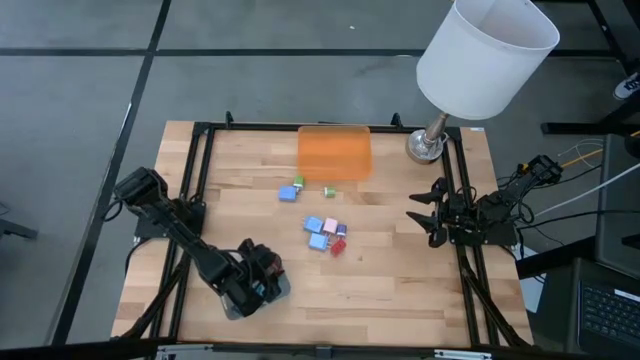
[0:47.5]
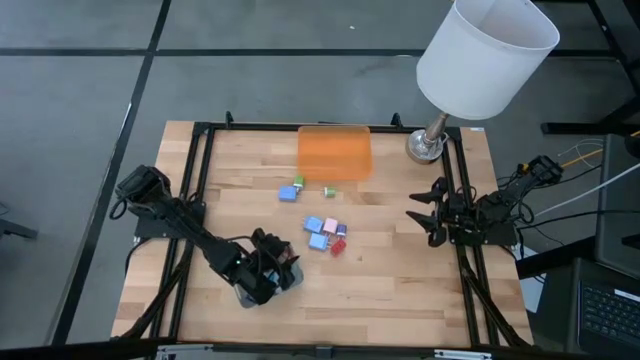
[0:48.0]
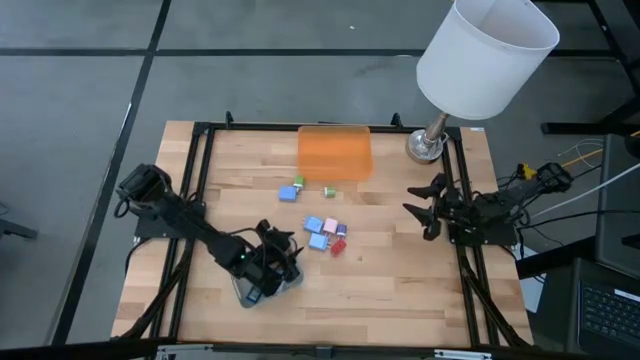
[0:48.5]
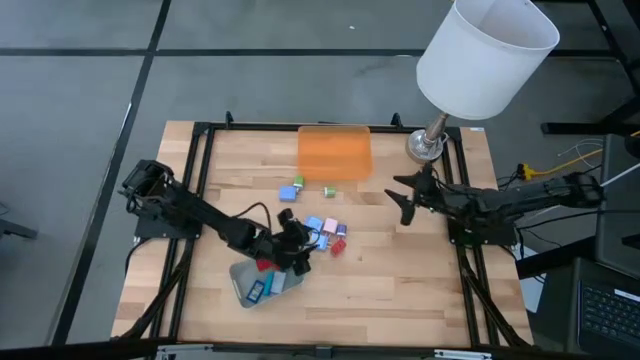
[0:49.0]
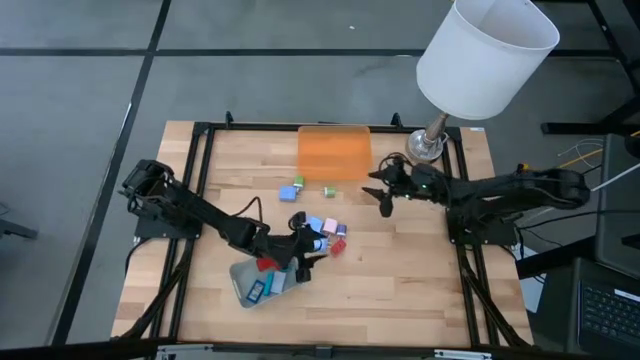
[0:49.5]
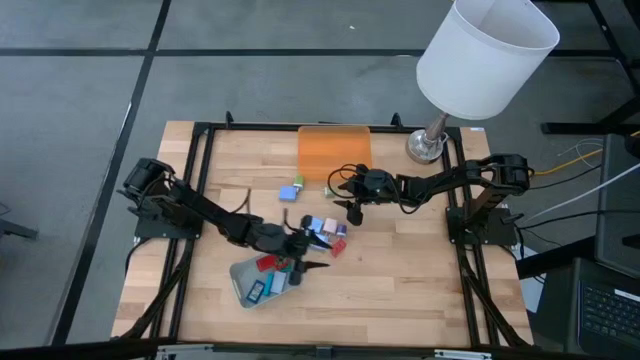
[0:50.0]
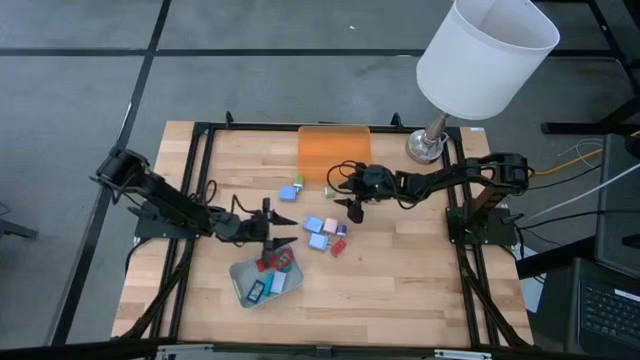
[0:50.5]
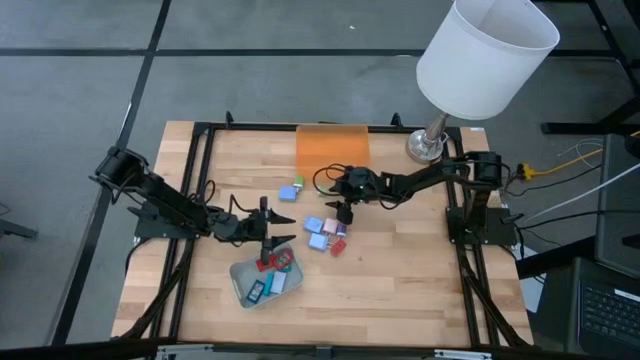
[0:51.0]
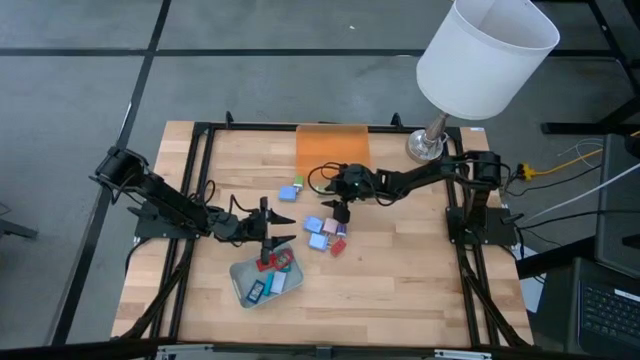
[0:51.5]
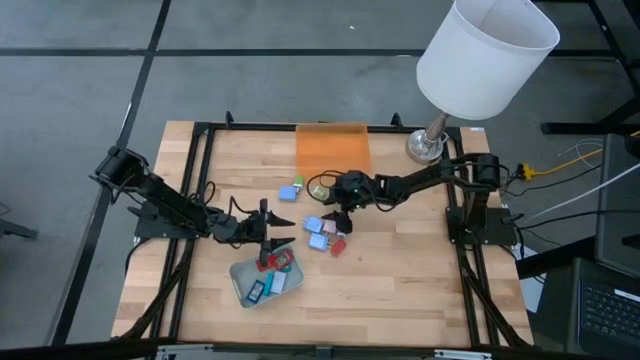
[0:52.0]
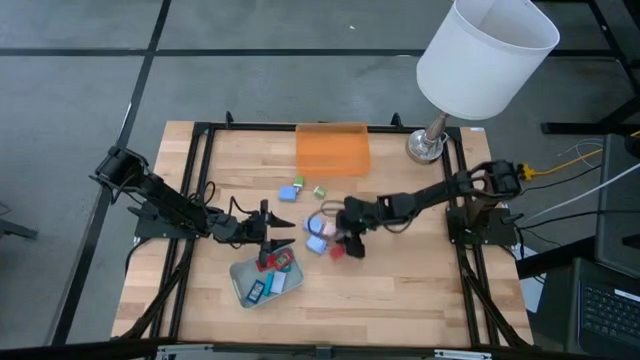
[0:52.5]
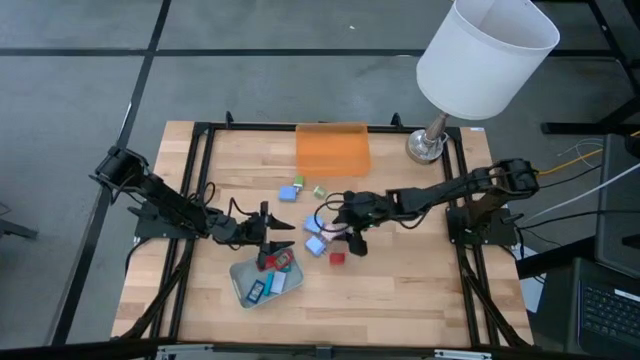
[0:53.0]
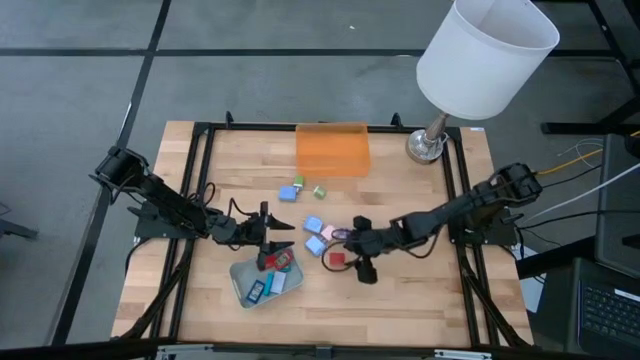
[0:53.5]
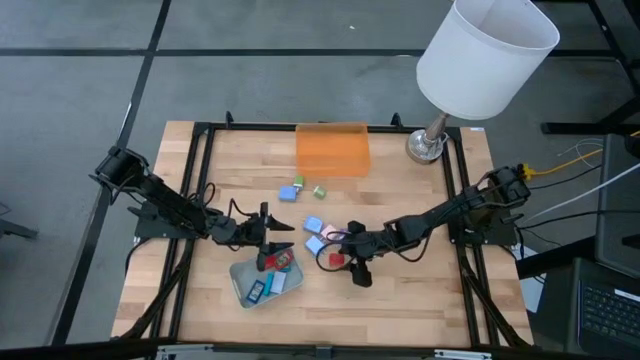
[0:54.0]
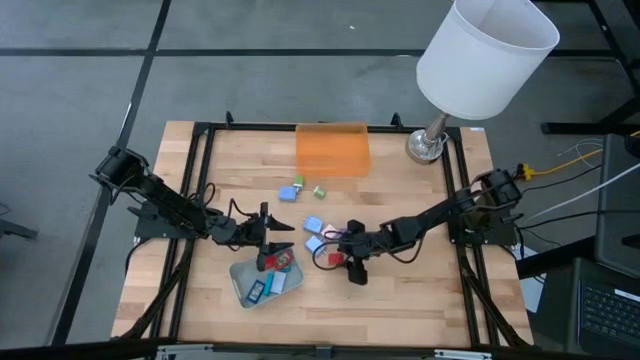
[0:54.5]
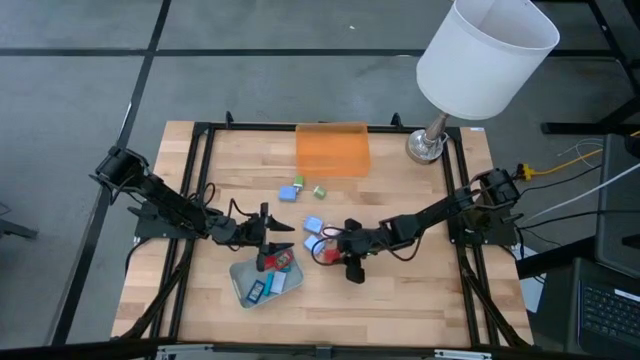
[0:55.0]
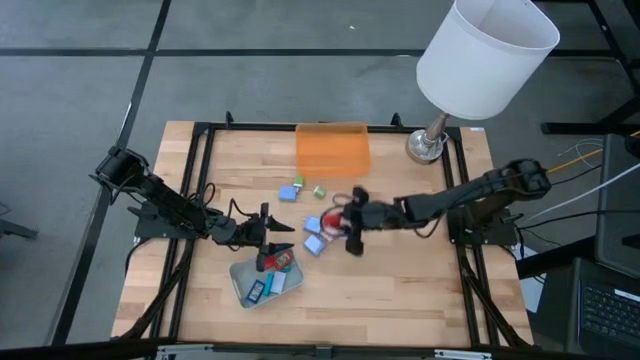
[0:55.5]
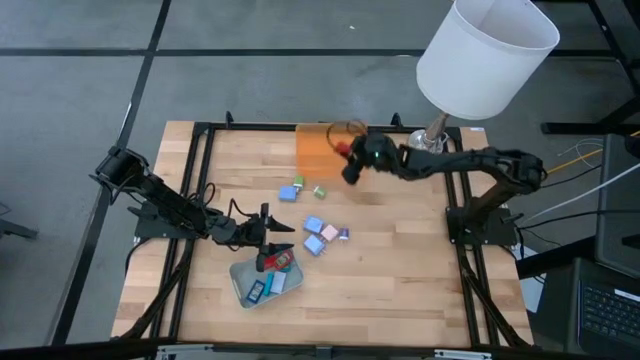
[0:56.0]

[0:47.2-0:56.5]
Task: Pick & Place Office items
Put the red charger adapter into the orange bin

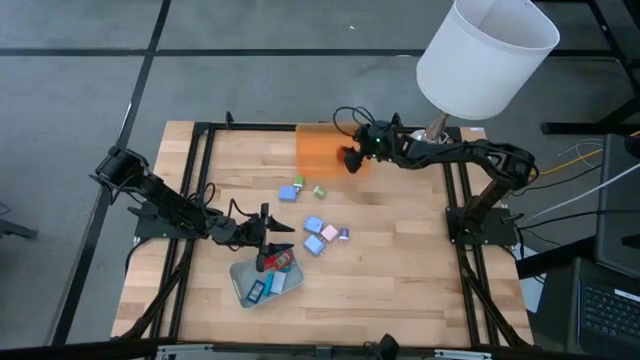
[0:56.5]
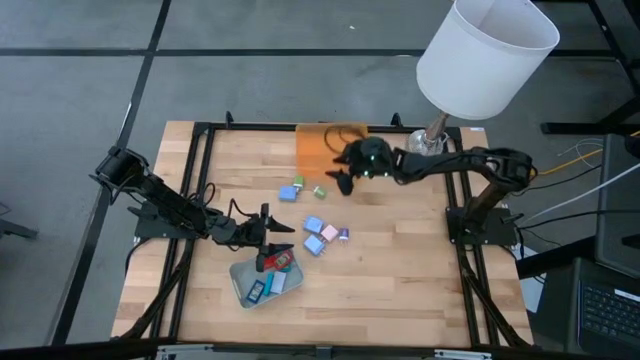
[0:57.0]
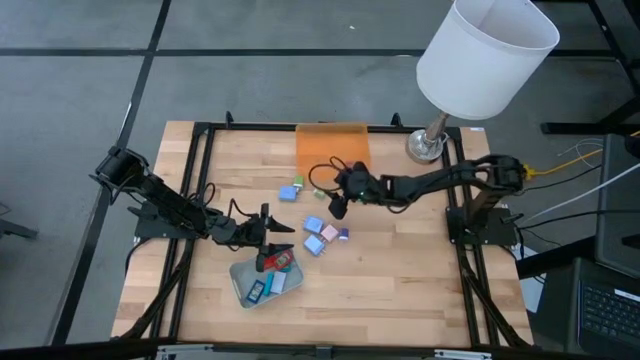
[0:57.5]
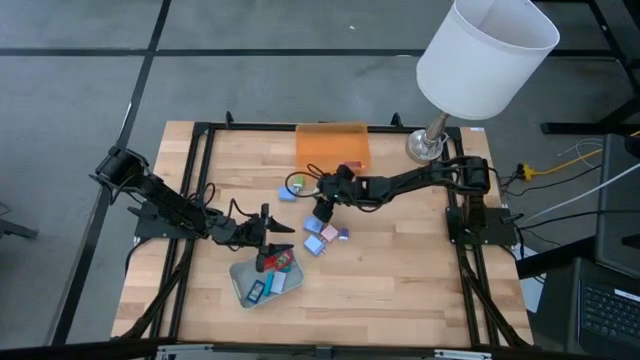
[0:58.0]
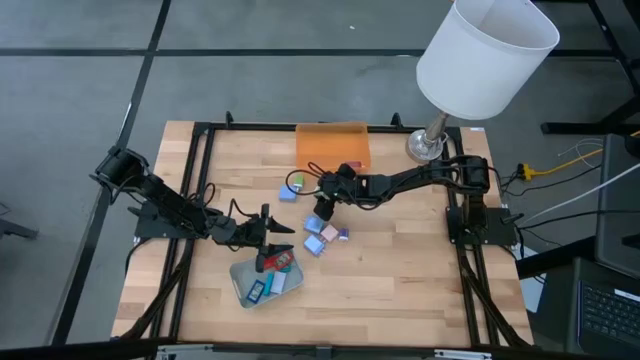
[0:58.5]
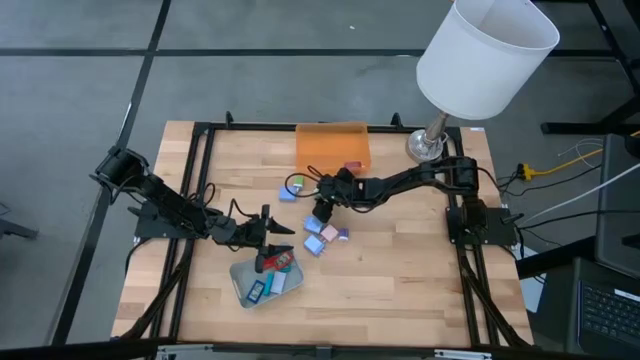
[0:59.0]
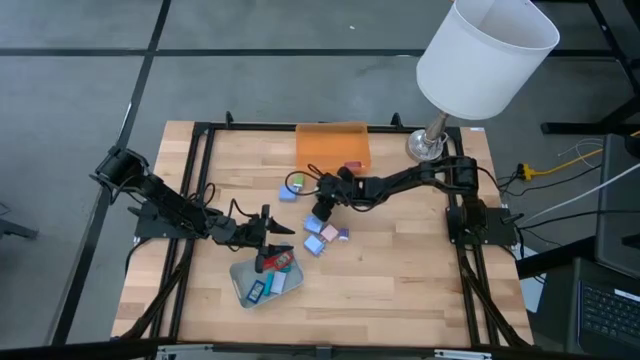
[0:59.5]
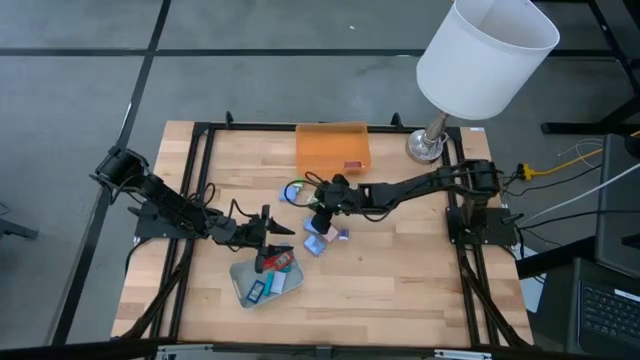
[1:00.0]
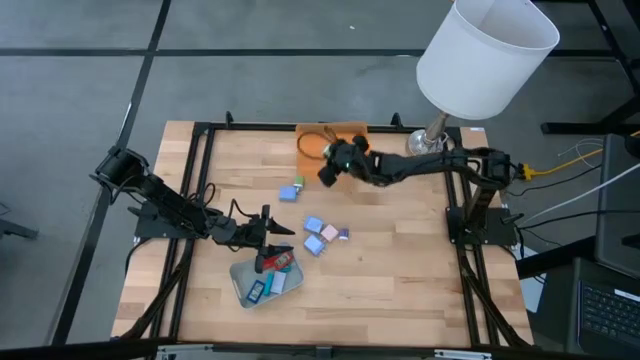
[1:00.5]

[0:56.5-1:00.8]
Put the right green charger adapter into the orange bin

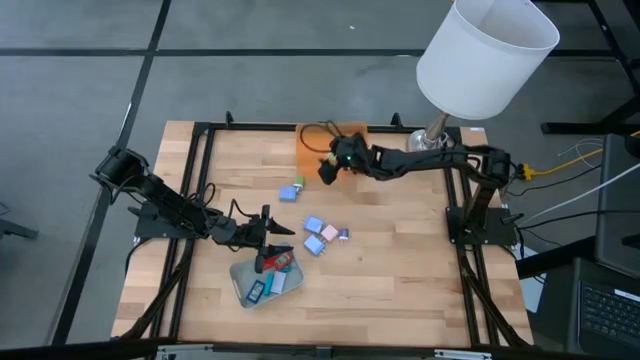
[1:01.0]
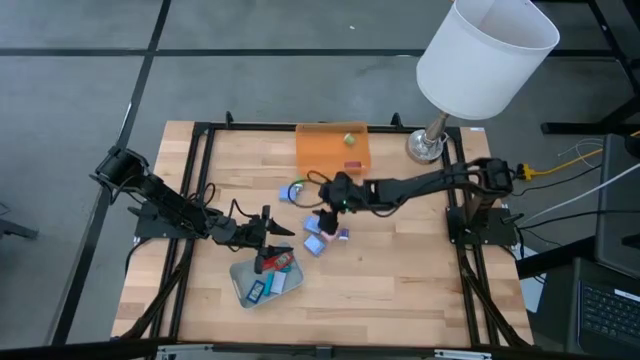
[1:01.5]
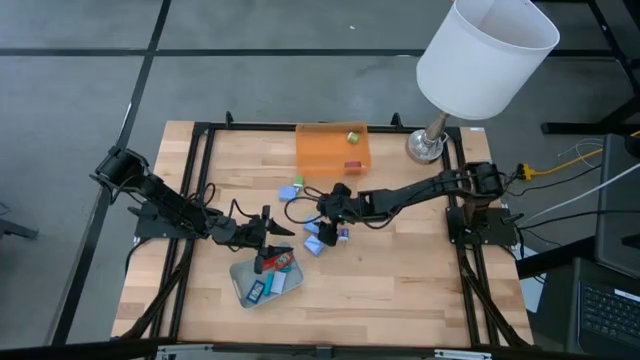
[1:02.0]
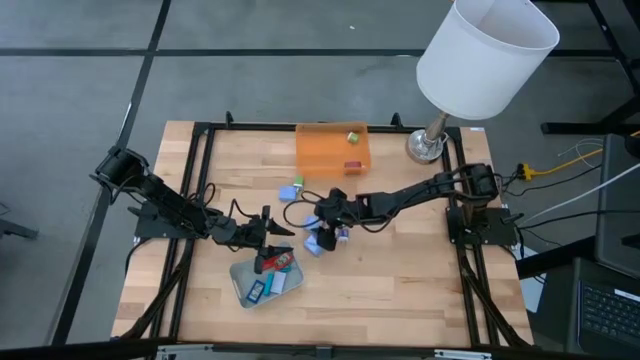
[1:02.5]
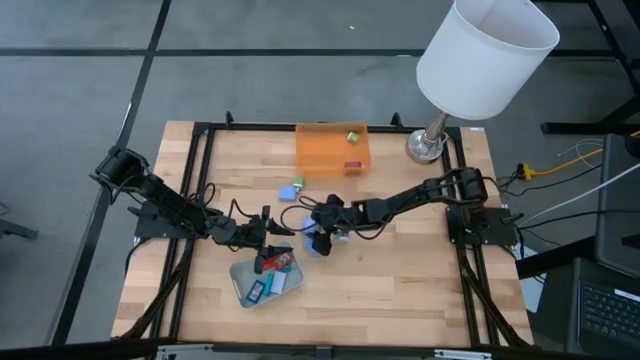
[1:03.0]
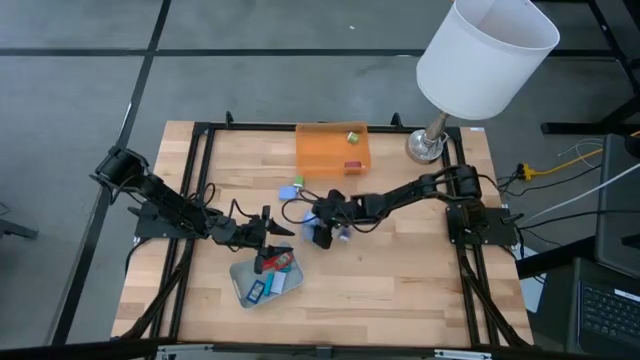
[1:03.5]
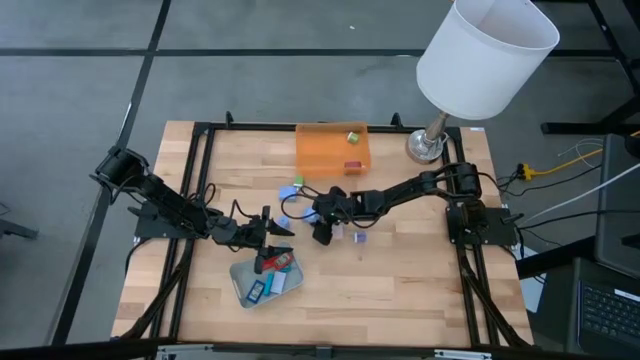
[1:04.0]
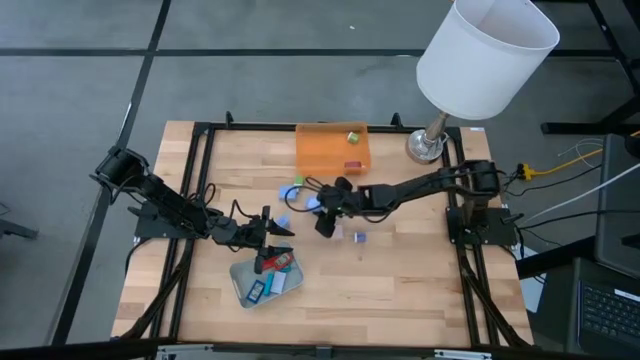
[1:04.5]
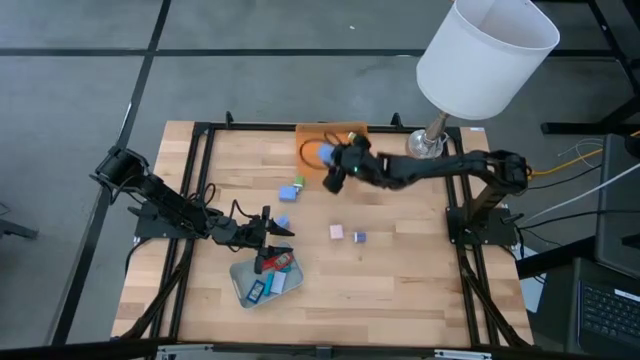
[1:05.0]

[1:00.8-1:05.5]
Put the middle blue charger adapter into the orange bin

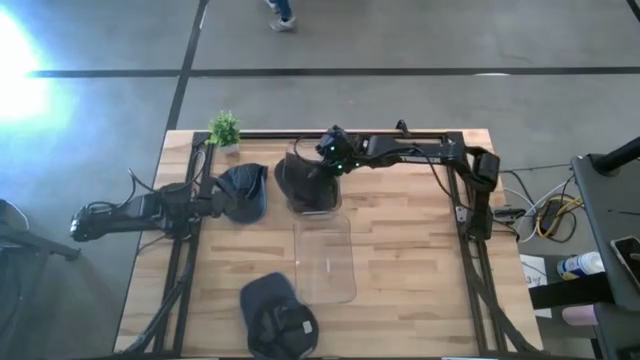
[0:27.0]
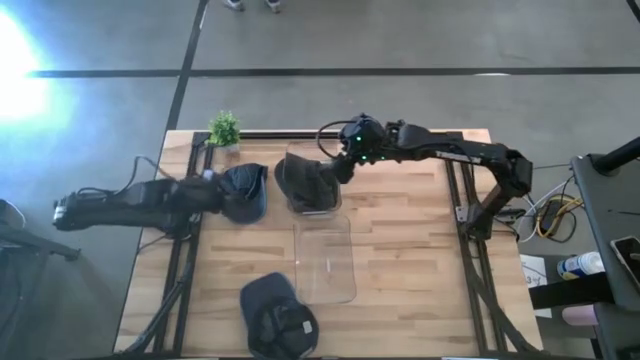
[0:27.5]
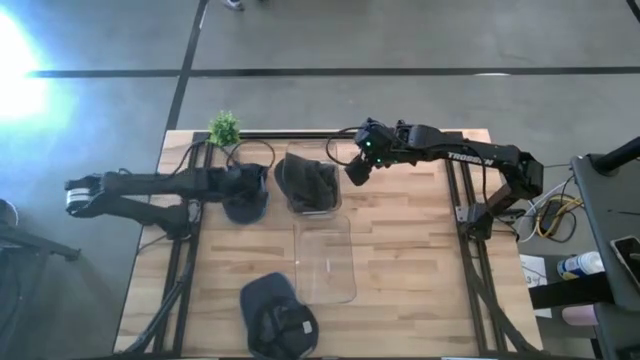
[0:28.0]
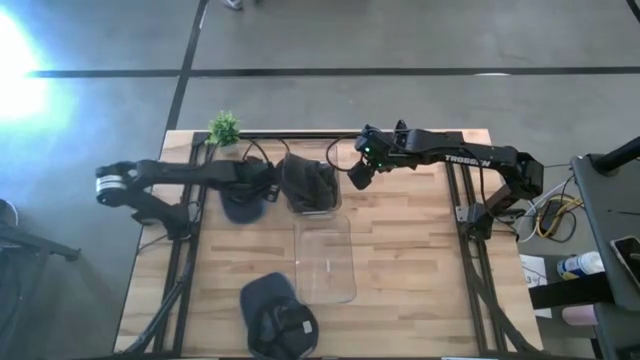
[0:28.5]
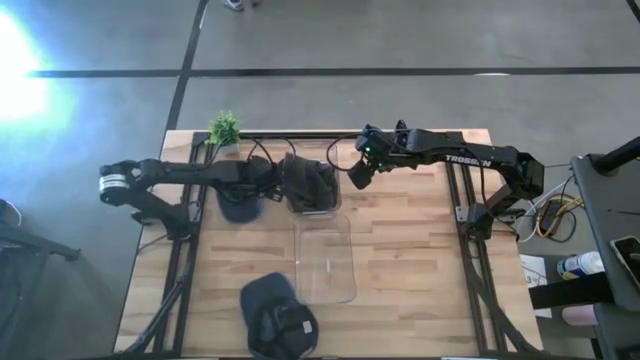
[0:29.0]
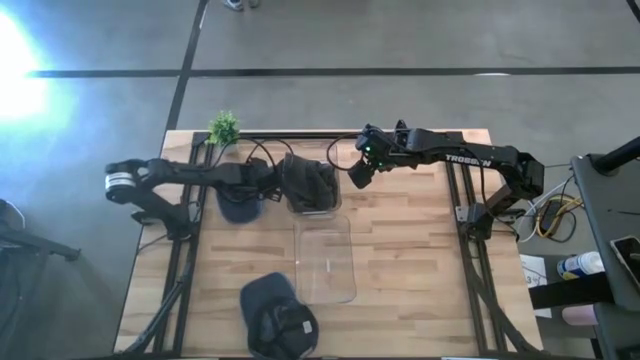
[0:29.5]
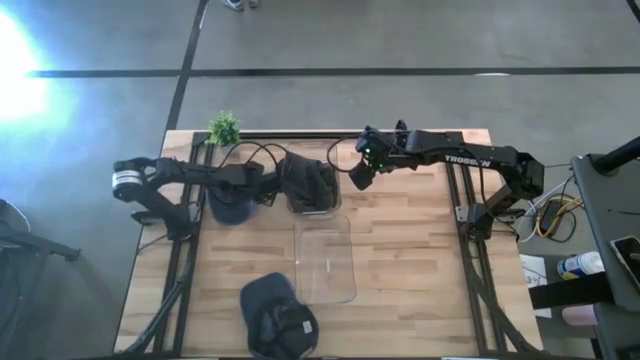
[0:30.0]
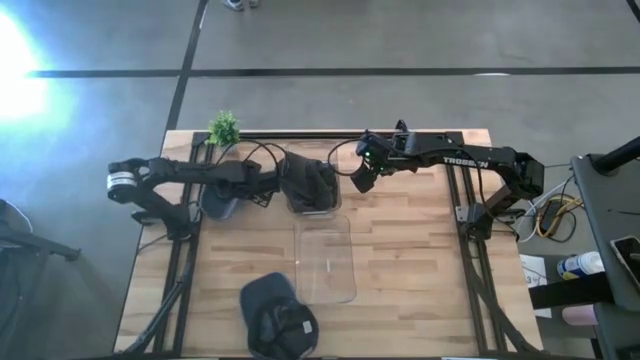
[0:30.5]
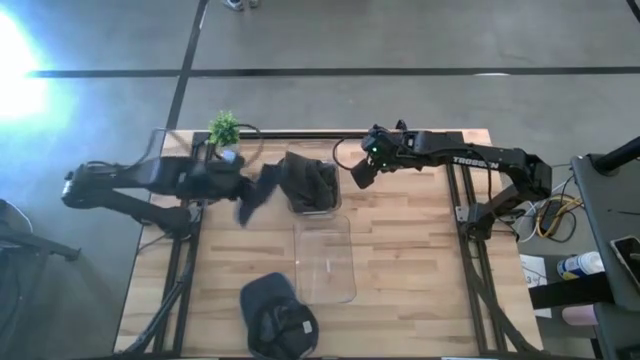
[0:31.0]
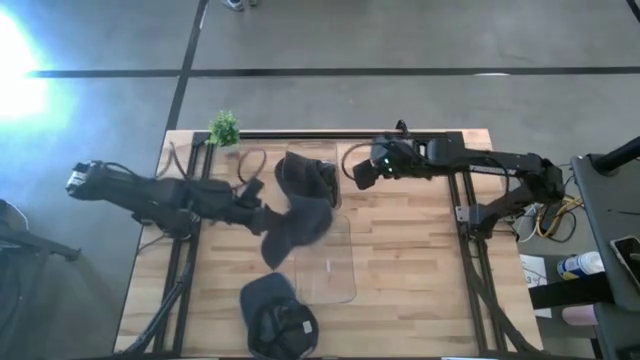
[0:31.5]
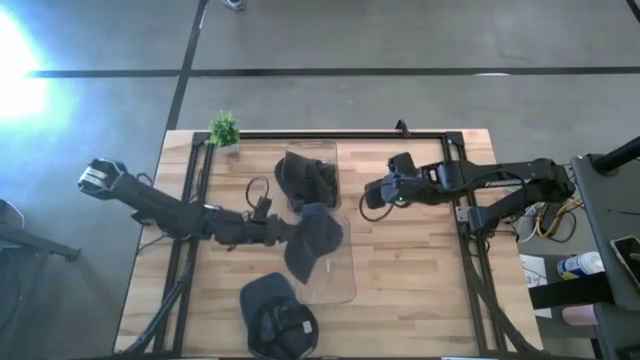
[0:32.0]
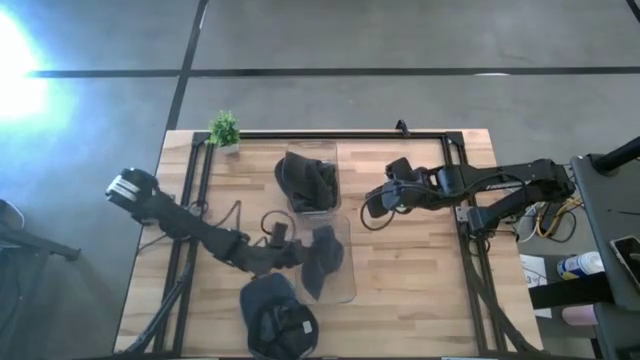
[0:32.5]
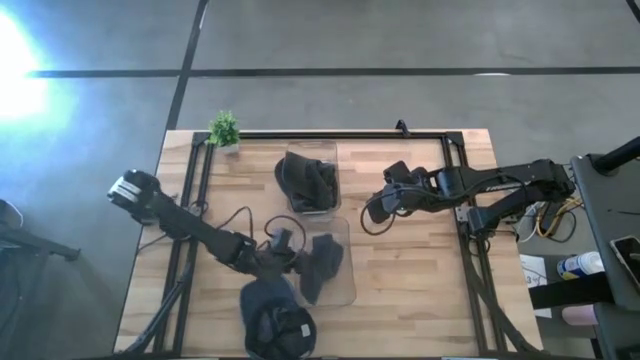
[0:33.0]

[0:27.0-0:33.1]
Task: Pick & Place hat
Put the top blue cap into the bottom transparent bin
